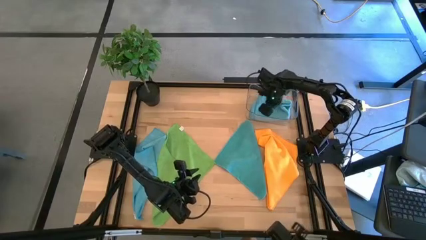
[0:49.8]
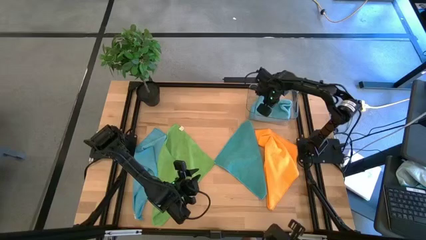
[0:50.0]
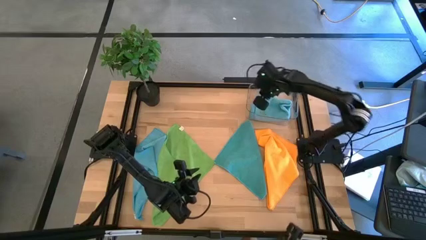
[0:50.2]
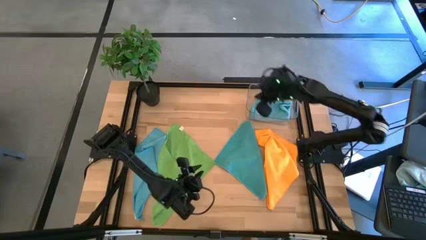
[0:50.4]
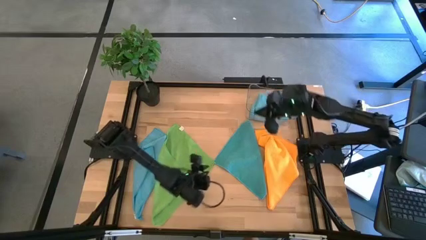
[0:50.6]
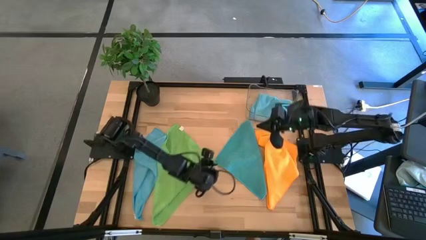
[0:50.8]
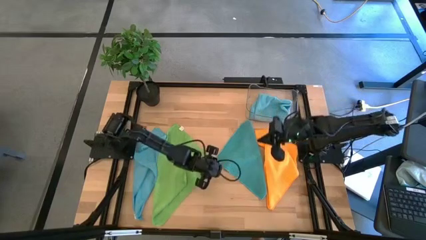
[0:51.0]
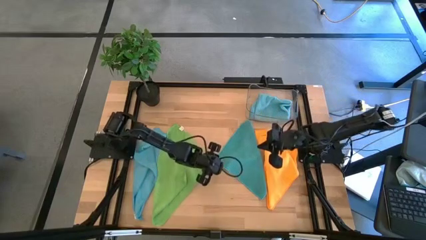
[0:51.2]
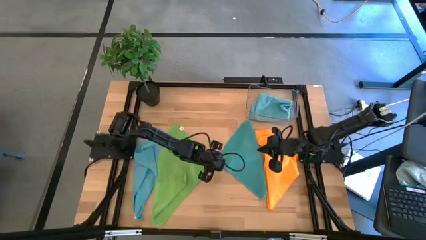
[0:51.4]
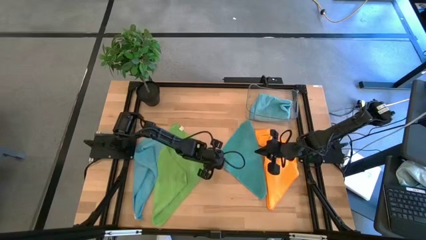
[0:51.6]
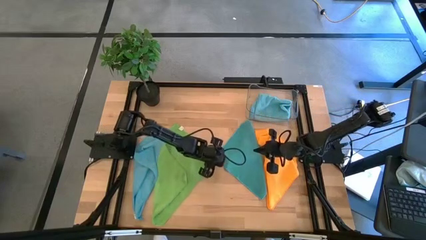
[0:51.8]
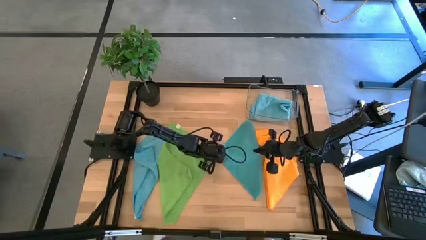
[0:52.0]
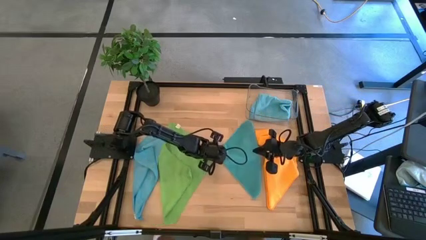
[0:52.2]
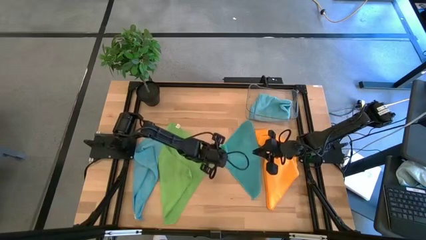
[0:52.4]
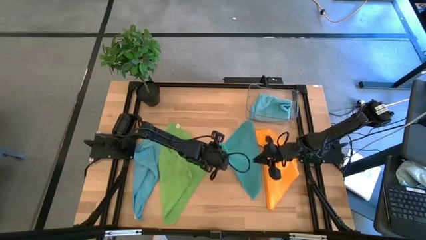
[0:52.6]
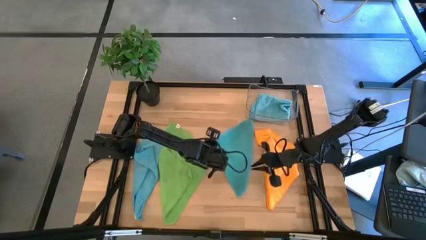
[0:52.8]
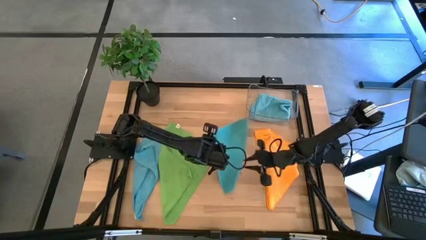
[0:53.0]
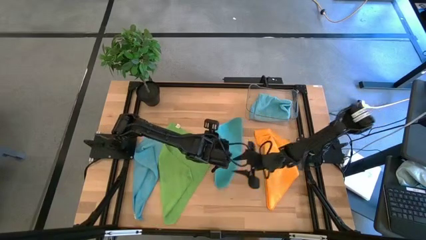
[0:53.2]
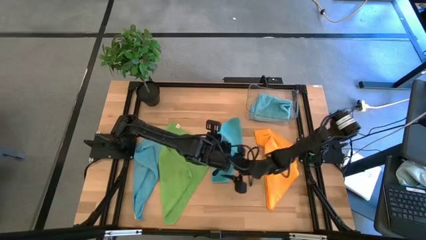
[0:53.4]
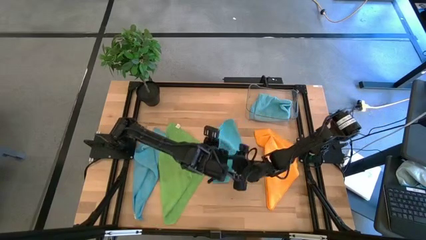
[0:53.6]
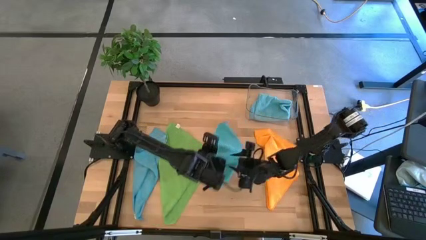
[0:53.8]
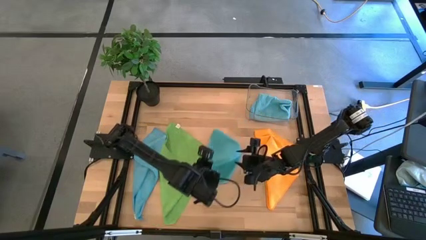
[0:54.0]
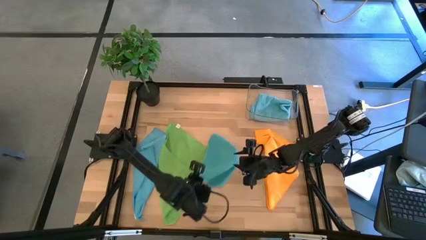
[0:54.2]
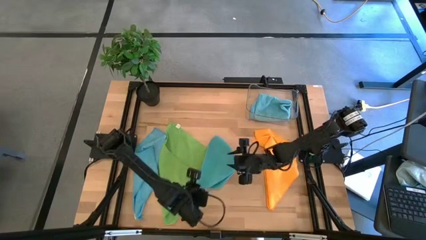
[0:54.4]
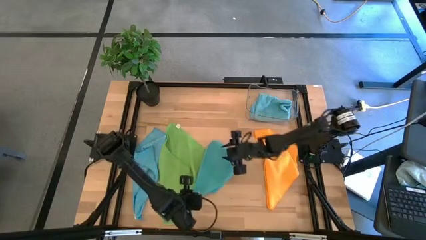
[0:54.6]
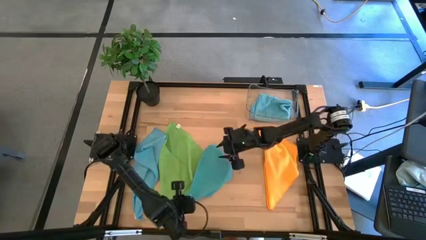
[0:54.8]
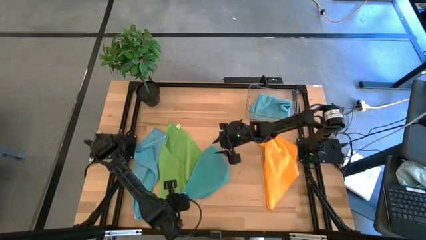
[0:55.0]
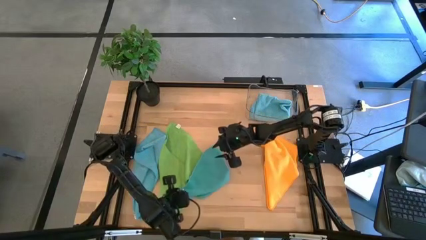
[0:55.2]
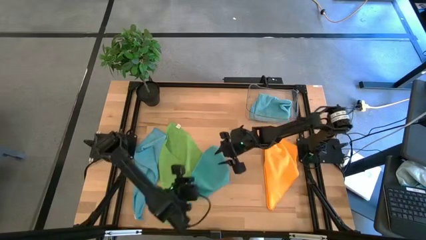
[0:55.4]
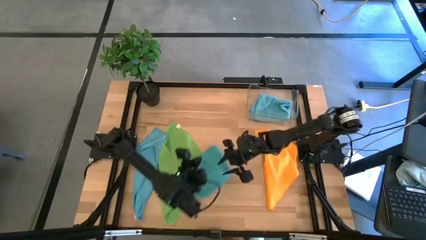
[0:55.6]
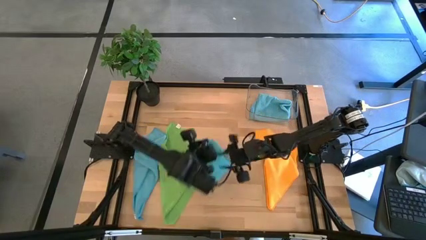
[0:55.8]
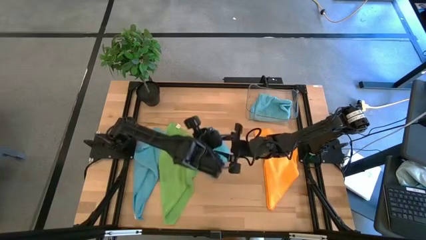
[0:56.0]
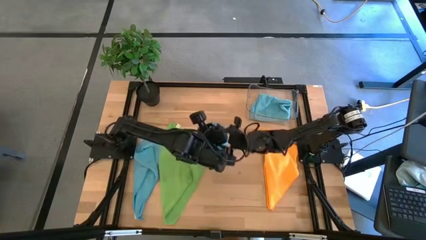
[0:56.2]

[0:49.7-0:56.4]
Task: Fold microfiber towels
Fold the blue microfiber towel

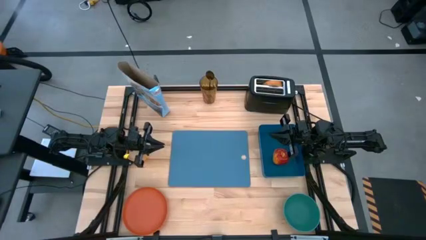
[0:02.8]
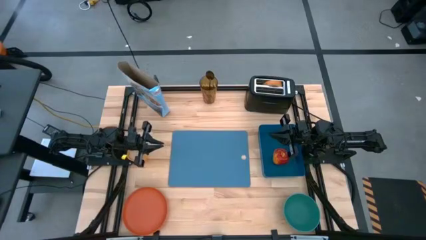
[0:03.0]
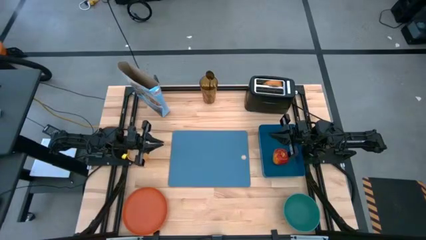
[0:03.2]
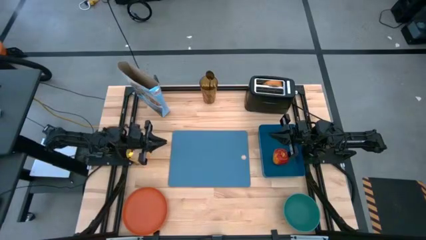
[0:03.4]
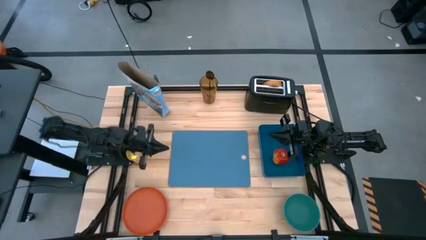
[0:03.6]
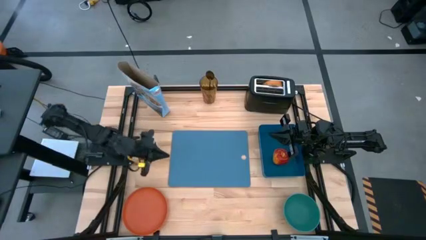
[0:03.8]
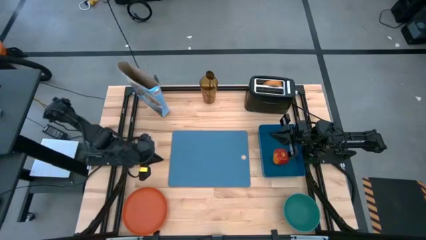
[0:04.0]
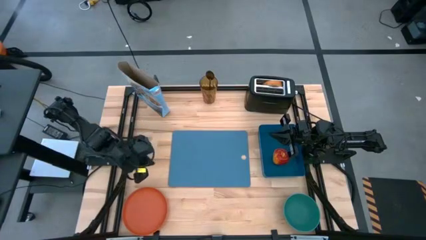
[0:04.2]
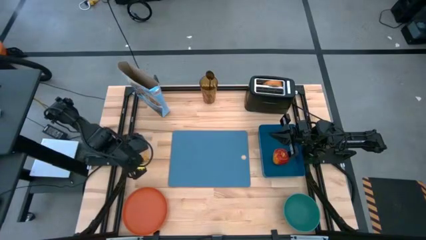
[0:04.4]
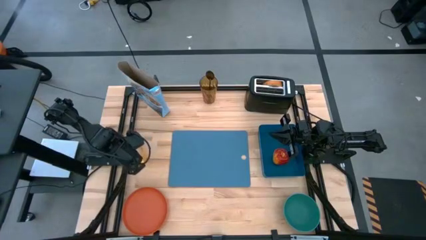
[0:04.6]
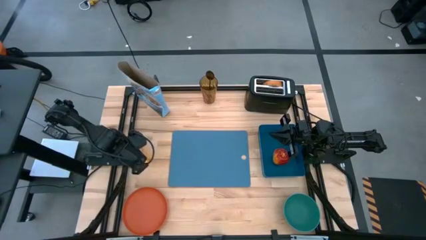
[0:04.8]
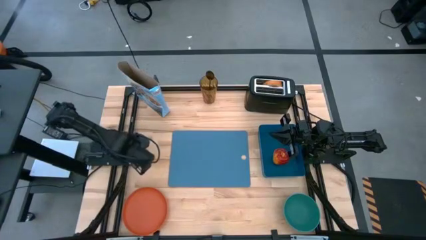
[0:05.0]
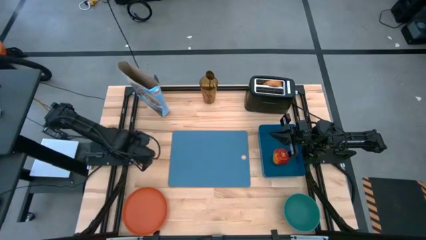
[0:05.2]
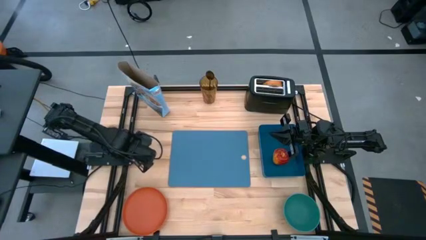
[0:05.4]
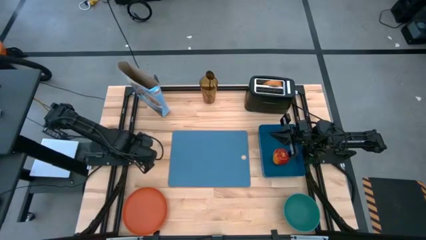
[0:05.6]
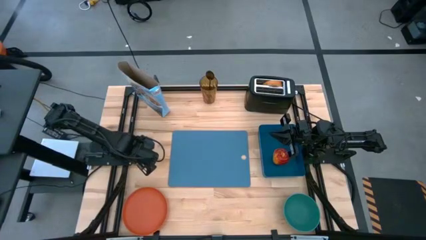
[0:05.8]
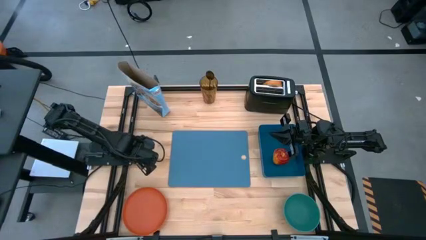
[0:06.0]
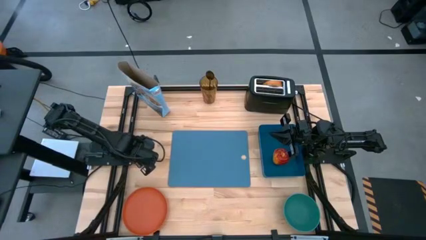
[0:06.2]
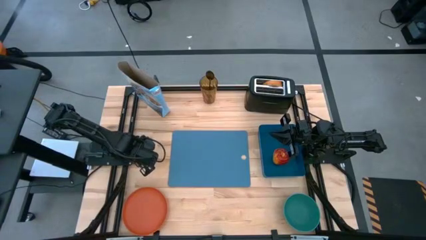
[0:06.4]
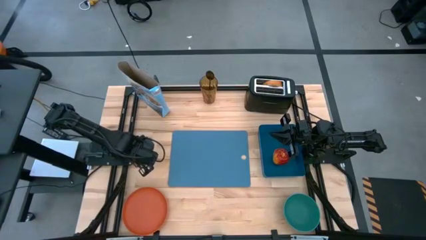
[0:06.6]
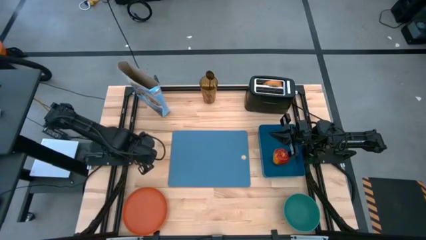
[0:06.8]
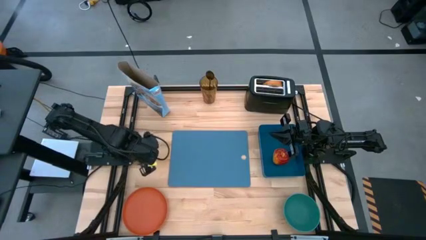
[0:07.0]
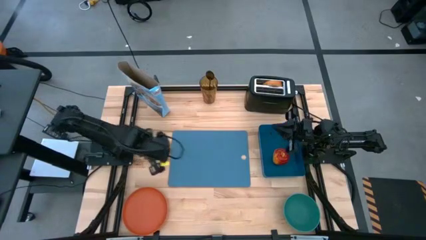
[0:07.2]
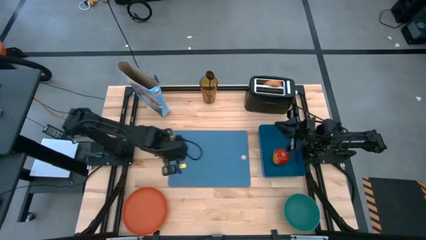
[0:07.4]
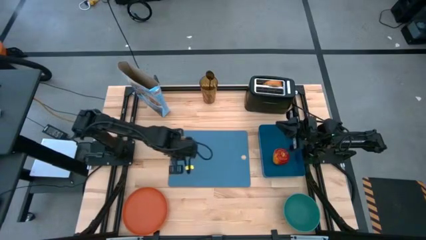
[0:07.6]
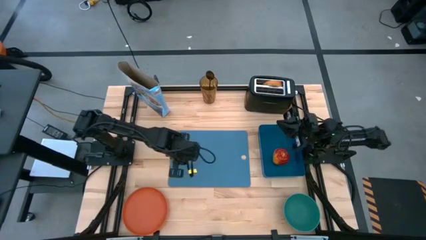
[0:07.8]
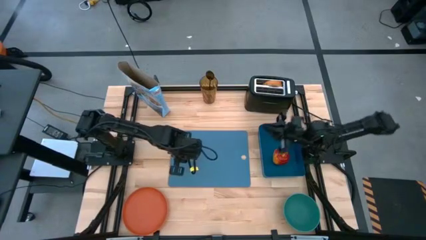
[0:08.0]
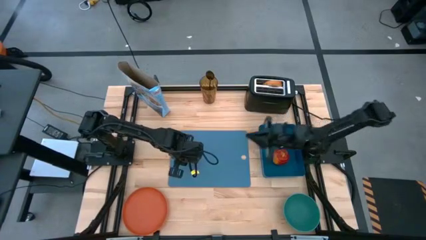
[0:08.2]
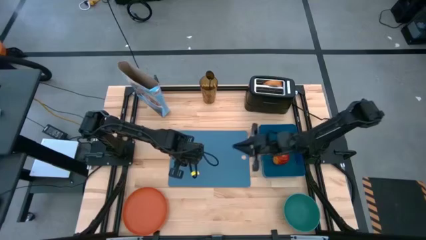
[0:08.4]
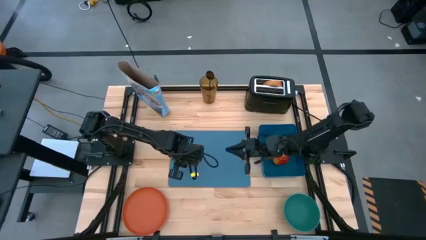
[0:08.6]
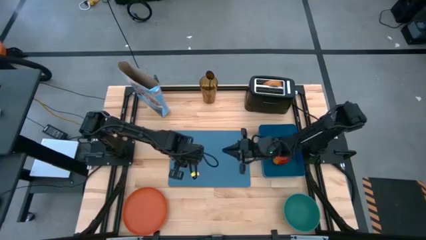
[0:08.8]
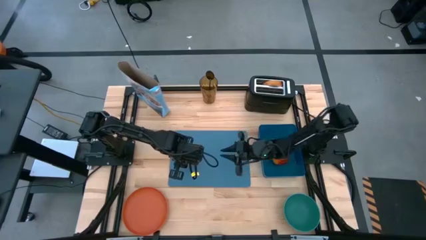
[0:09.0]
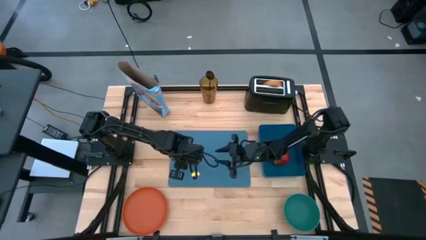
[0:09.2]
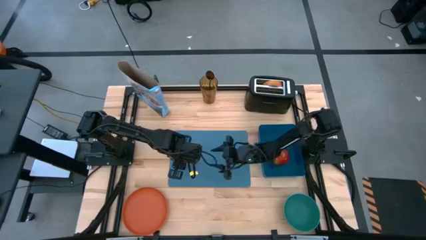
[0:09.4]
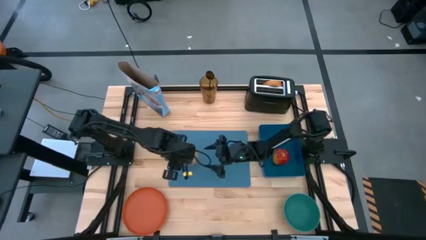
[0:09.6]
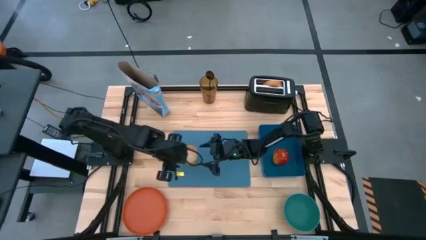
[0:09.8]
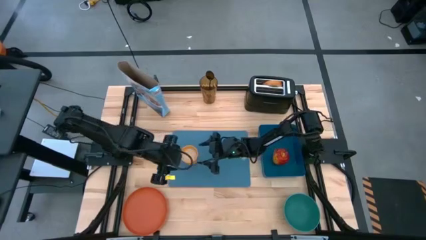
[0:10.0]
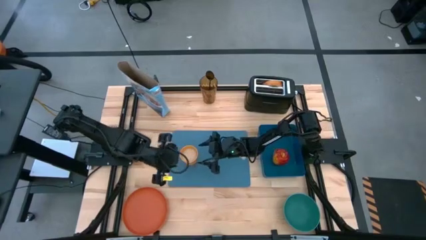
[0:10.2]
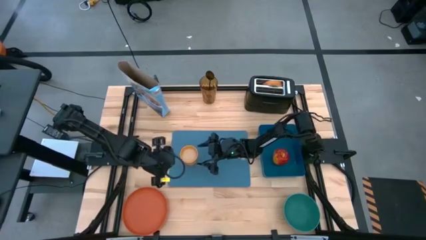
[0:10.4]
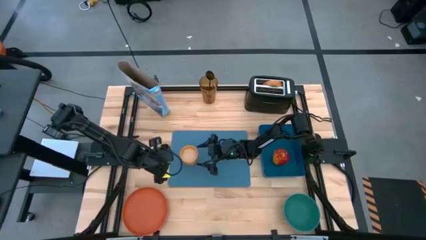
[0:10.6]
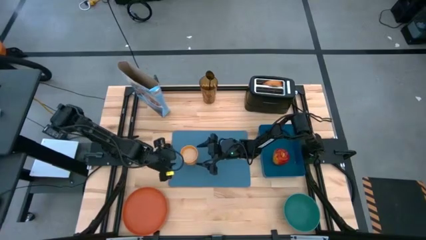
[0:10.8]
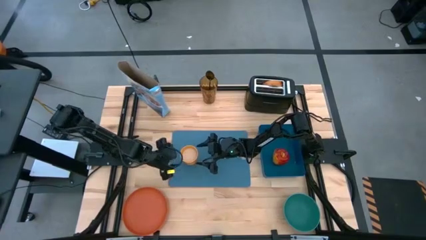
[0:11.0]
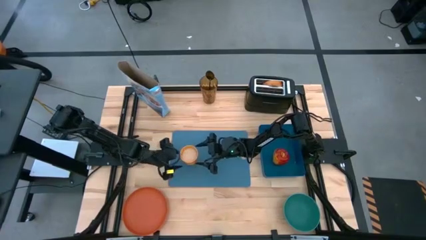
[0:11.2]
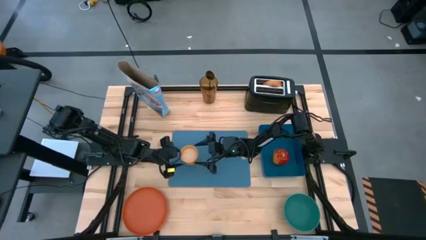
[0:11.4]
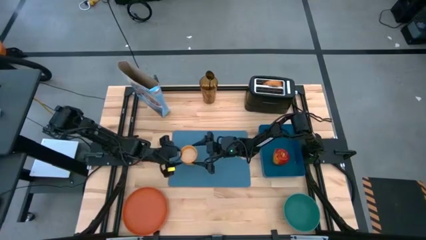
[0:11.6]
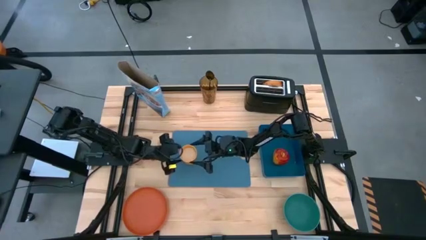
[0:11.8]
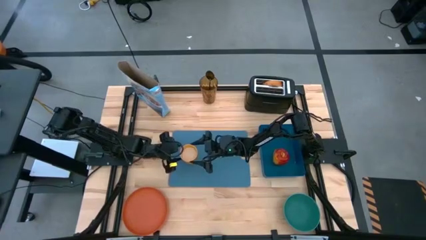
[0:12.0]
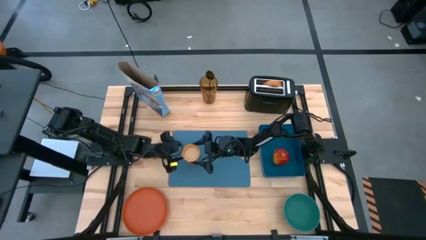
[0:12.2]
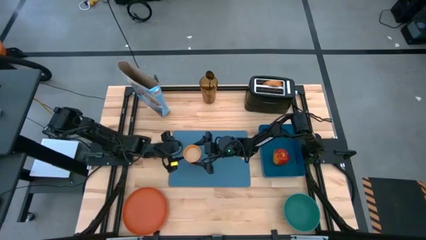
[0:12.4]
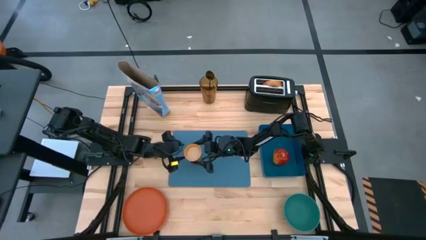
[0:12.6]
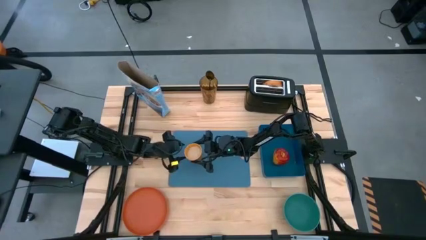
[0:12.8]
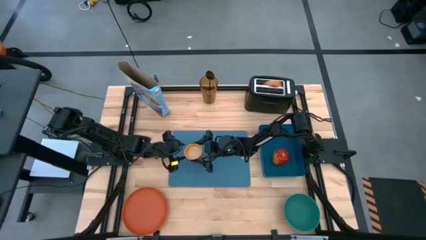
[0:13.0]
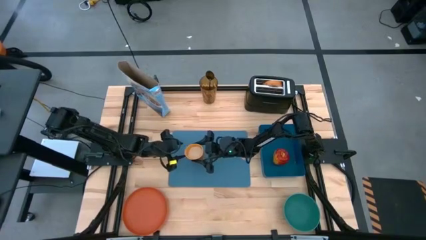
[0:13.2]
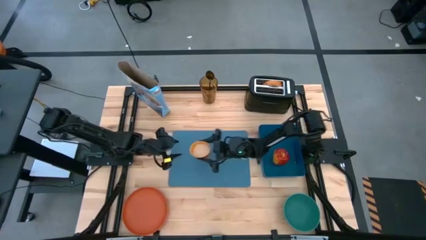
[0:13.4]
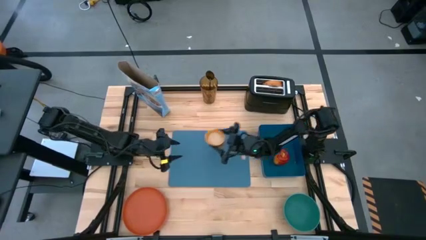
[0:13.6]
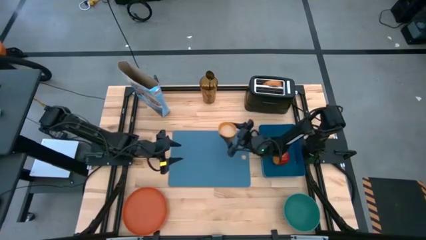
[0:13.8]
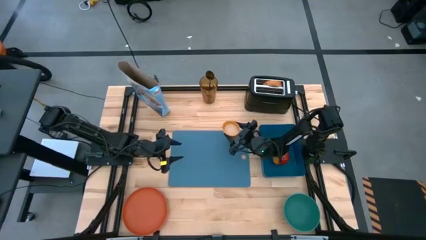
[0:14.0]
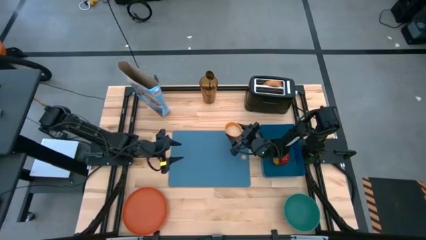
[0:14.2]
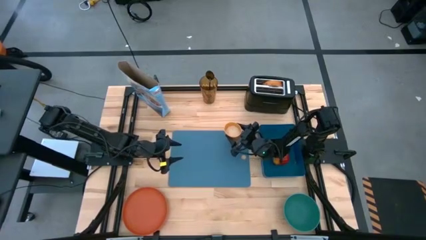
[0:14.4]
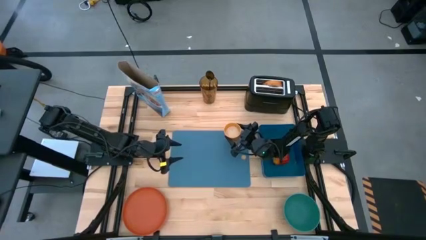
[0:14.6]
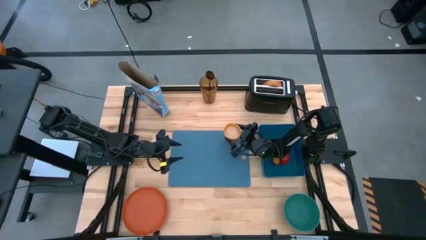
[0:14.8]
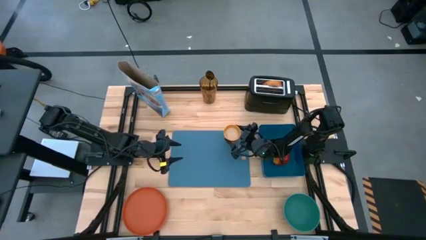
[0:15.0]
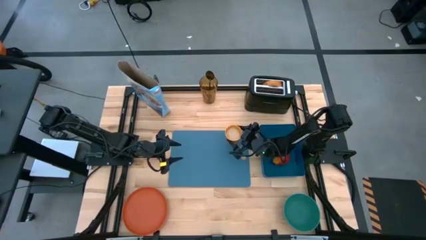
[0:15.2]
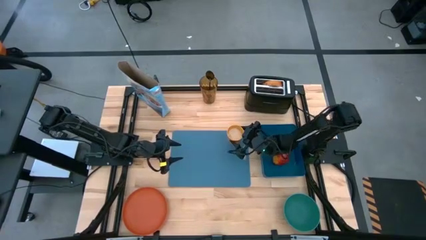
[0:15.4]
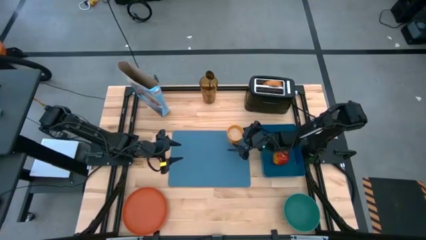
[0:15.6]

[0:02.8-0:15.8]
Task: Arrange a breakfast setting
Put the yellow cup on the light blue mat
